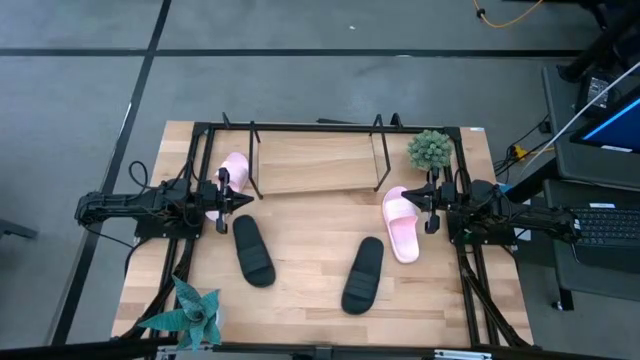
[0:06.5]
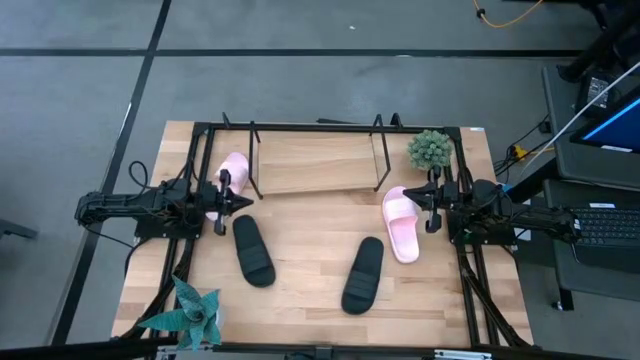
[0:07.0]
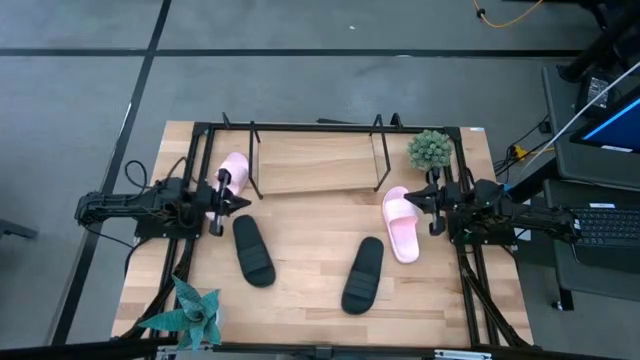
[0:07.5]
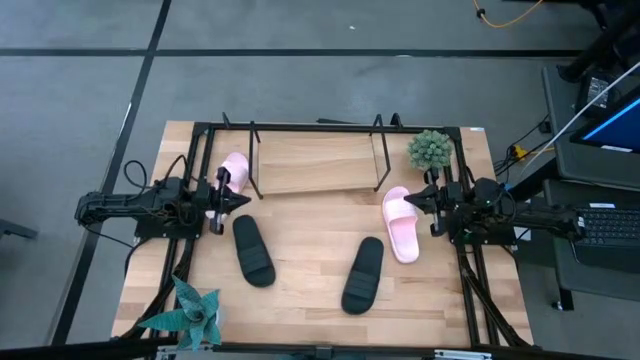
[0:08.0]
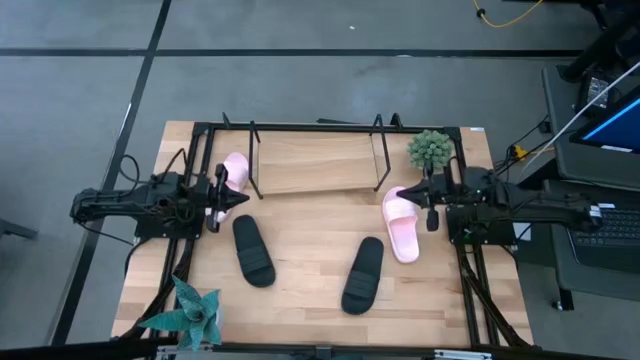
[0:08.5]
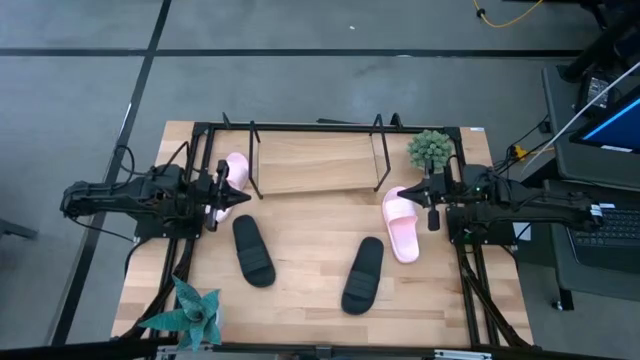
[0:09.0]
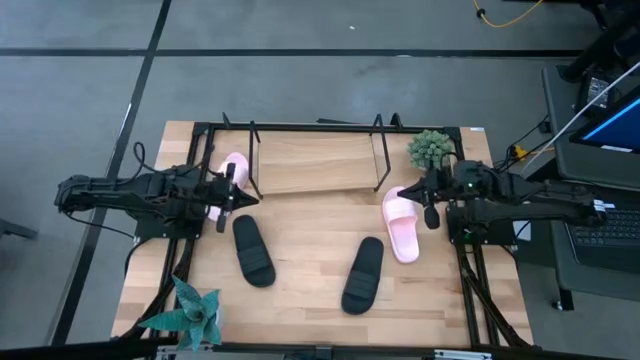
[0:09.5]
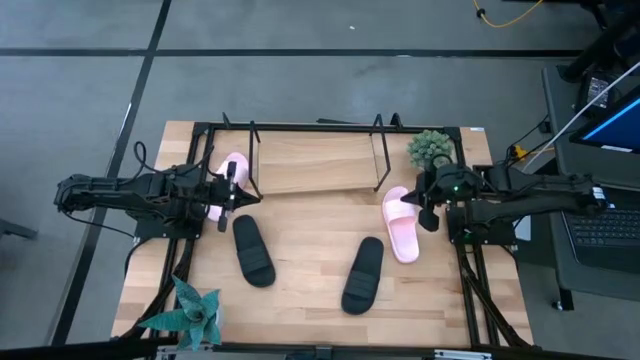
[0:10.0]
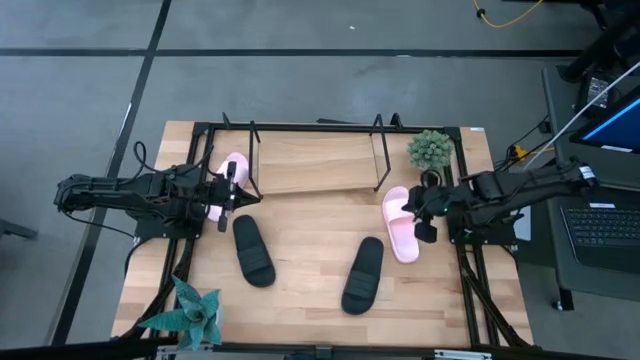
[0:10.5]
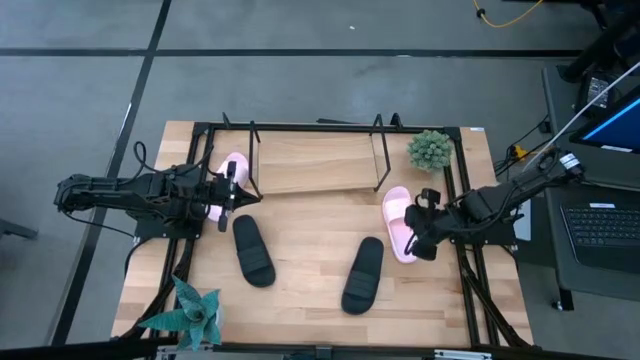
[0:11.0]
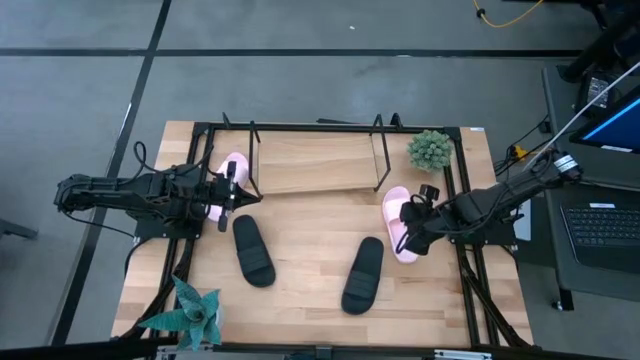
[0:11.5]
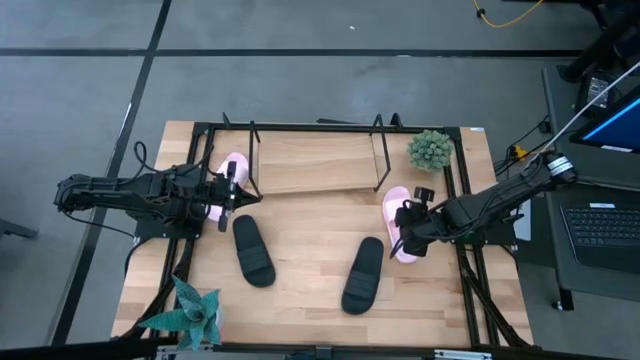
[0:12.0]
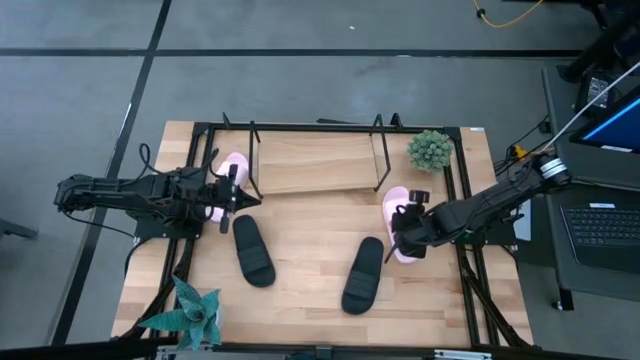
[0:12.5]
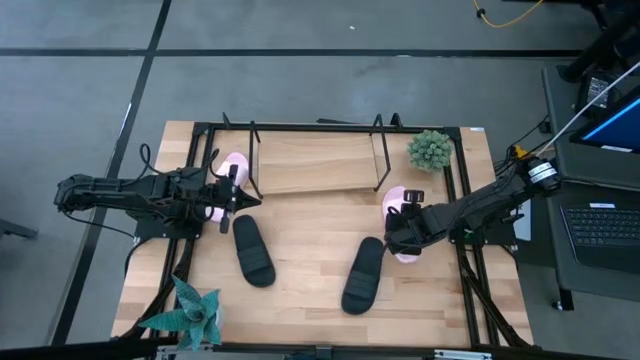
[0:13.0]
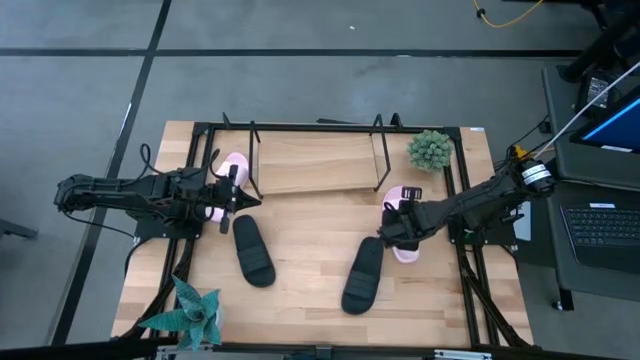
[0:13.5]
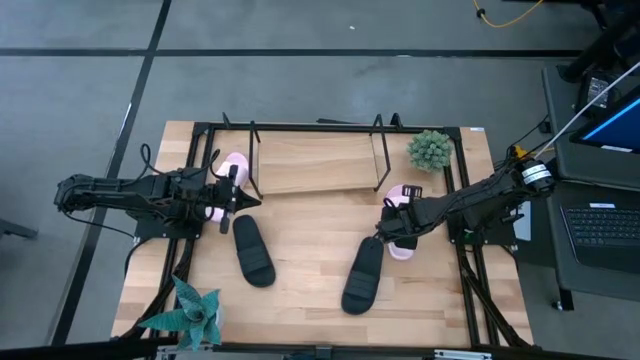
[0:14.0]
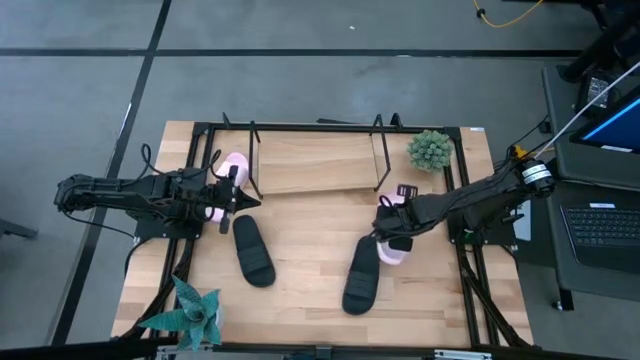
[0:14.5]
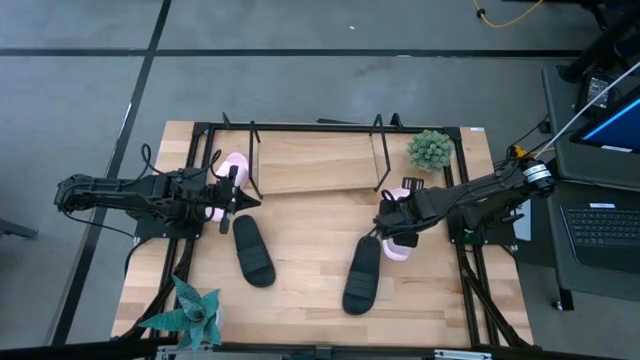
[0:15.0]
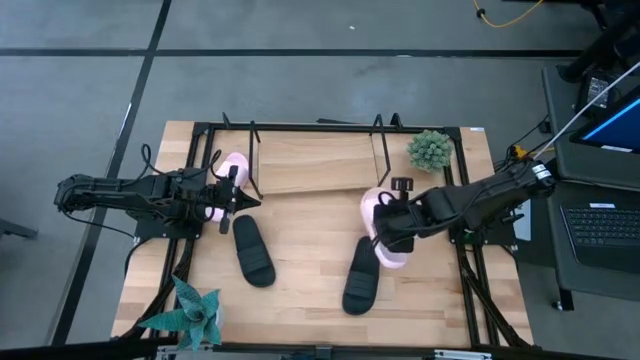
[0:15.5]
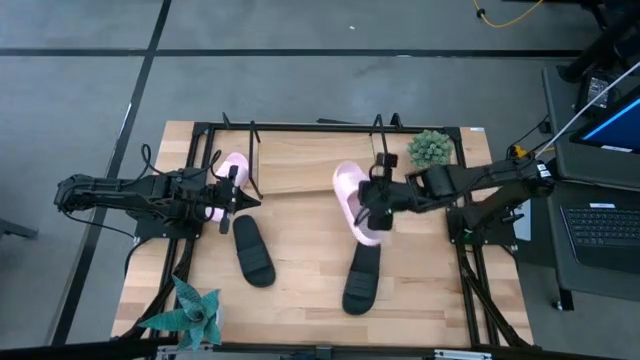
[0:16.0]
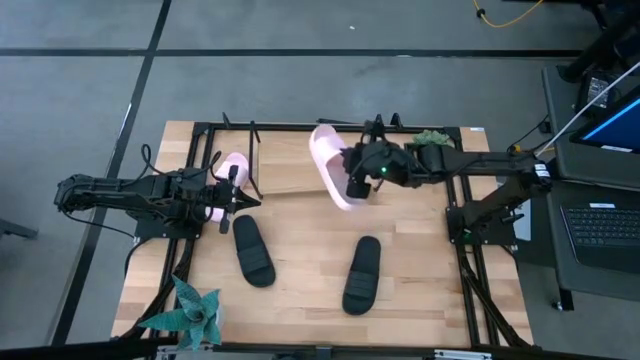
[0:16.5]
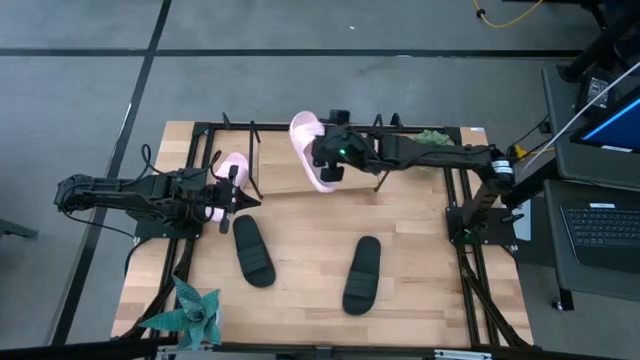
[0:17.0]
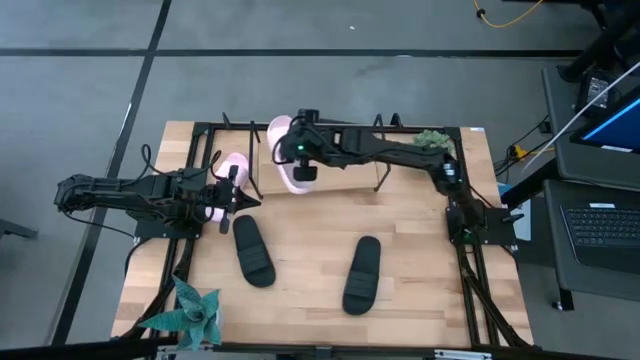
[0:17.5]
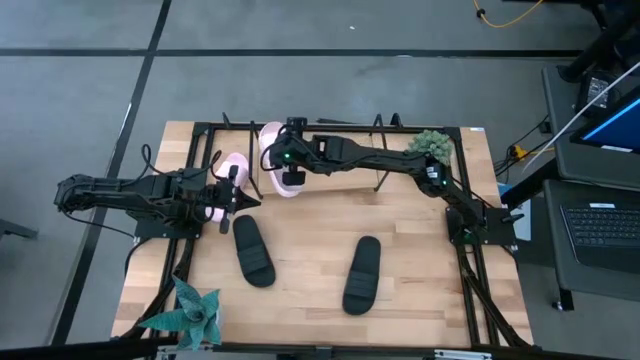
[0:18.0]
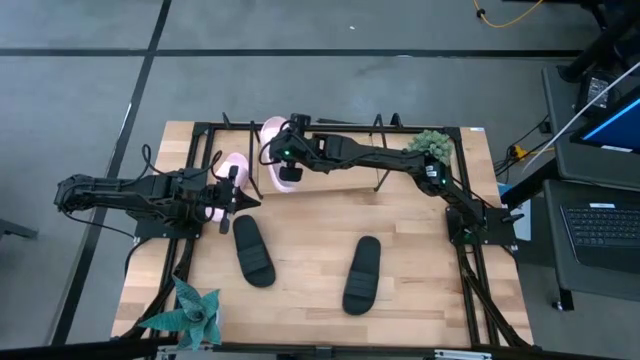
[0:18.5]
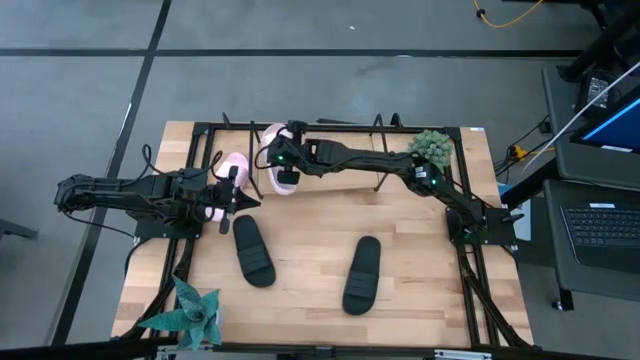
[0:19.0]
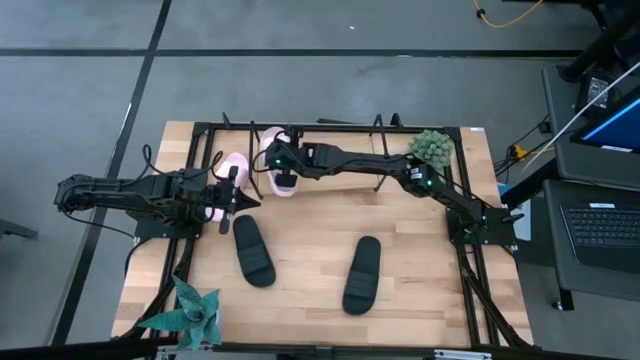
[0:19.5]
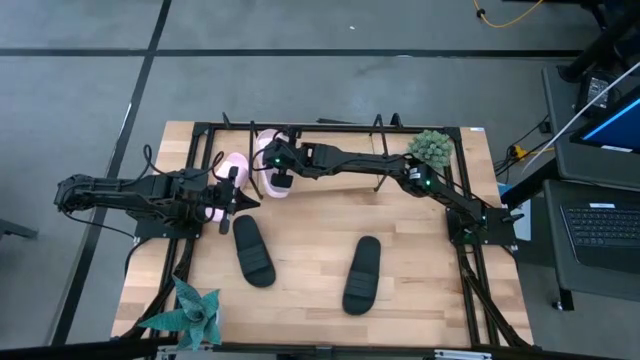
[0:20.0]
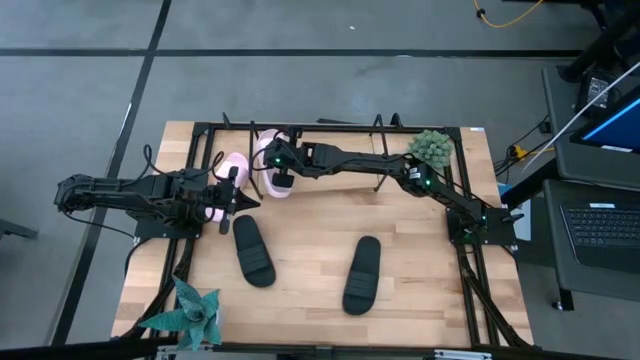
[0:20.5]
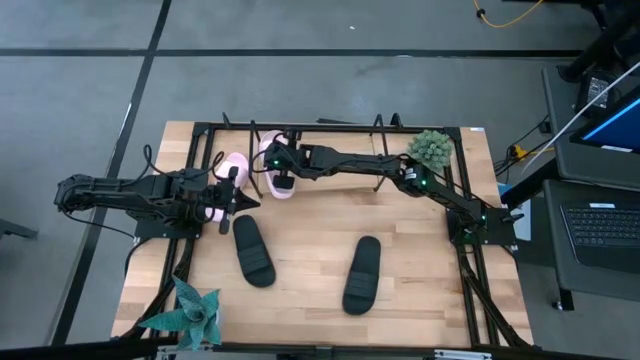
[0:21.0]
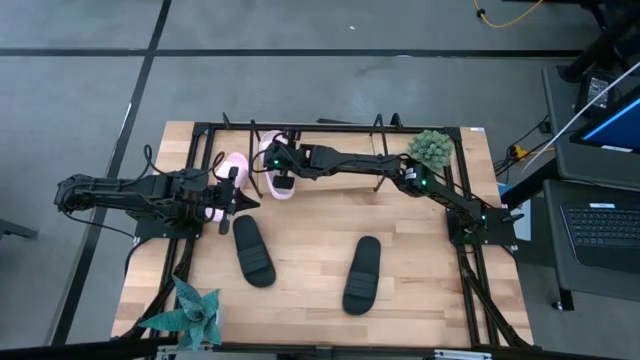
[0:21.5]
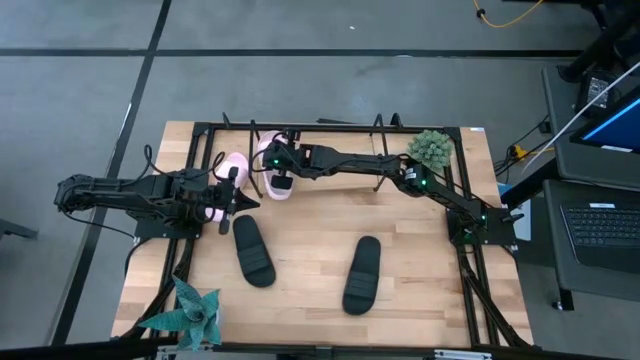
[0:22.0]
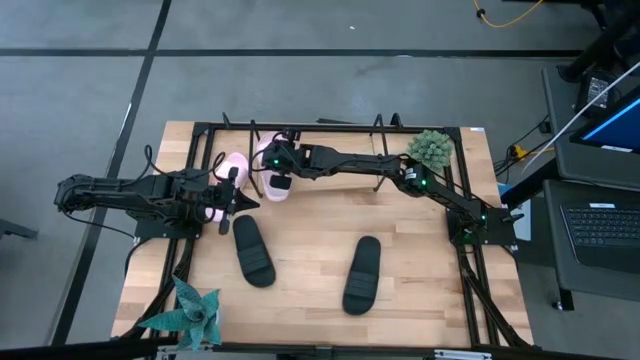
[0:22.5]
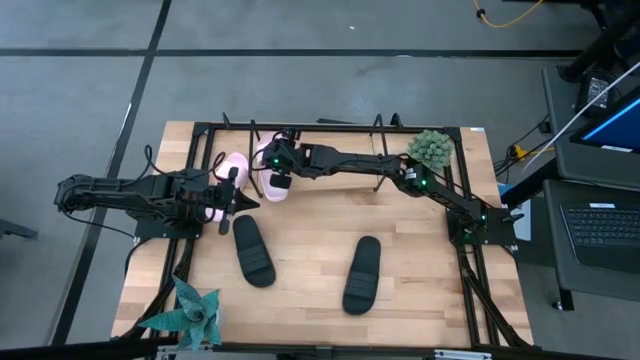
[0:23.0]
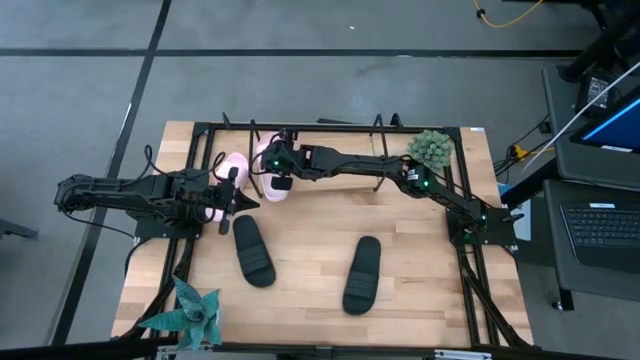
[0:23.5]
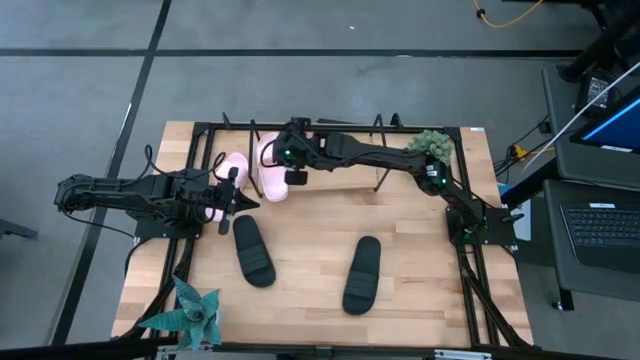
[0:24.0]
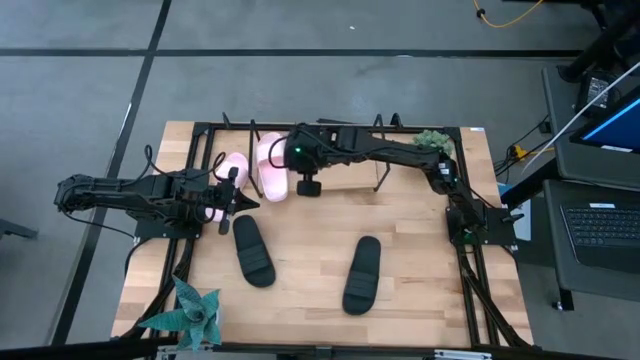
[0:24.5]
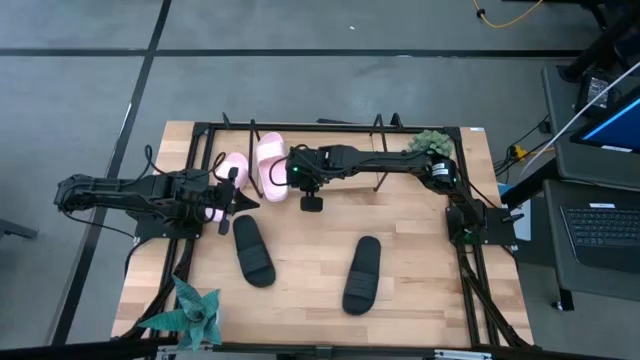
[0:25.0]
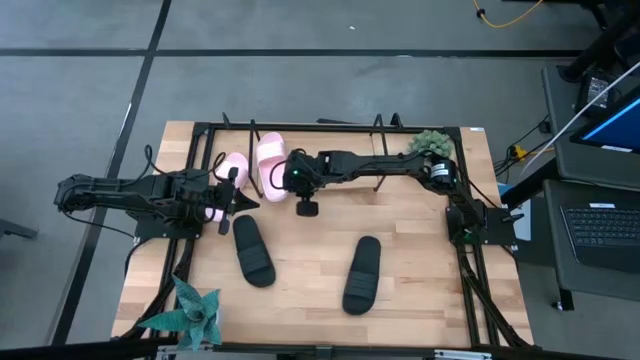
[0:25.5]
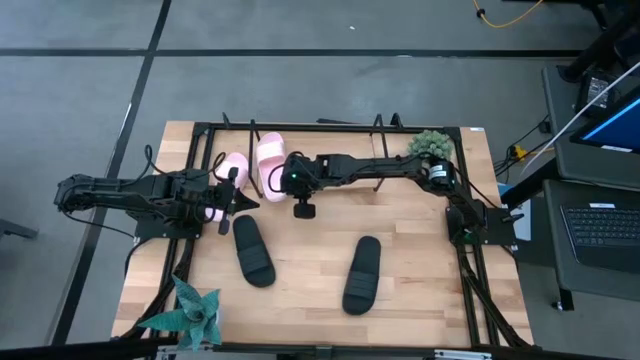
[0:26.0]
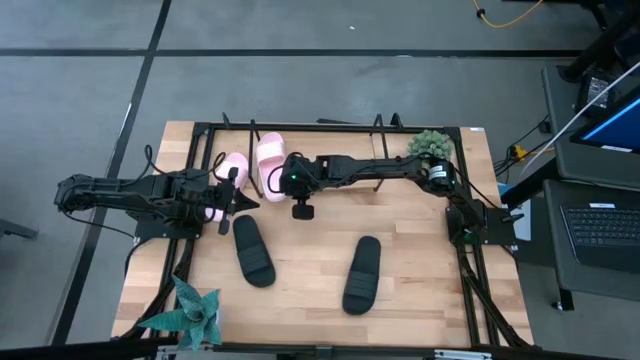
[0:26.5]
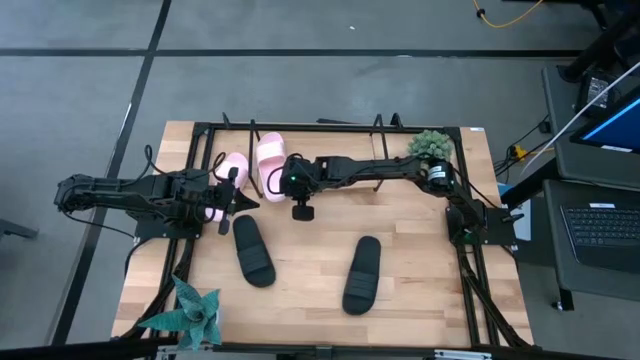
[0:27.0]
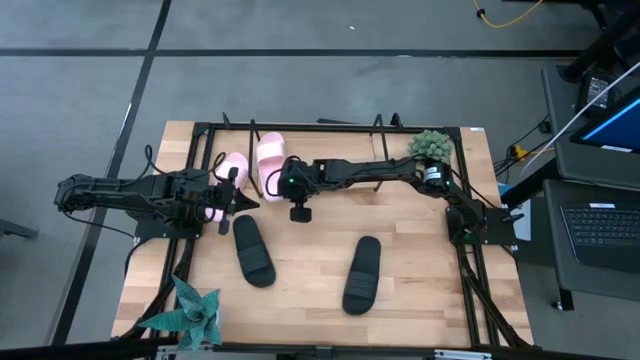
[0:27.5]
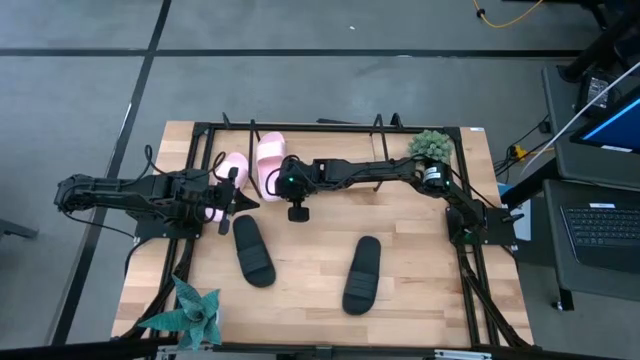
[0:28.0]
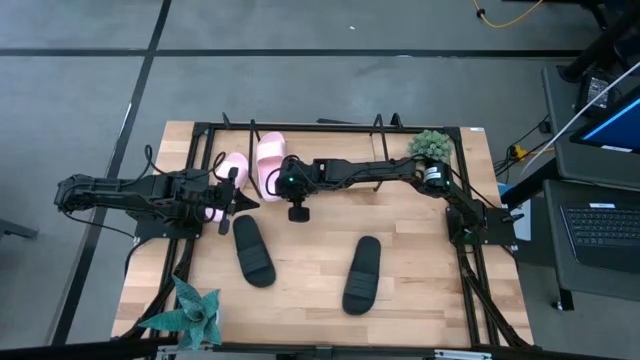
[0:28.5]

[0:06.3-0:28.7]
Task: Pick and place slides into the shelf
Put the right pink slide on the shelf
